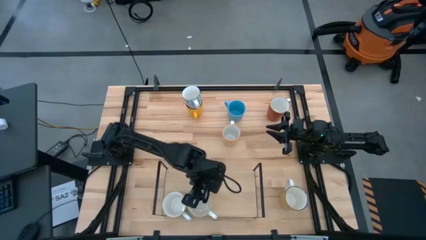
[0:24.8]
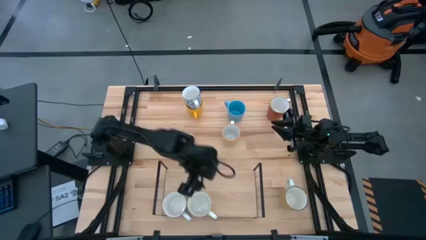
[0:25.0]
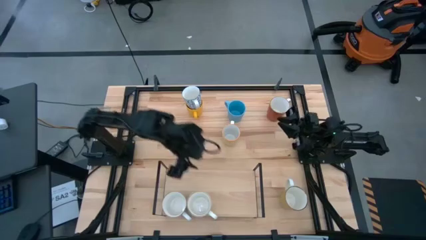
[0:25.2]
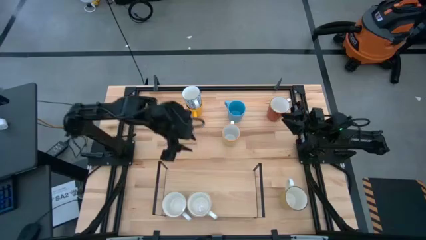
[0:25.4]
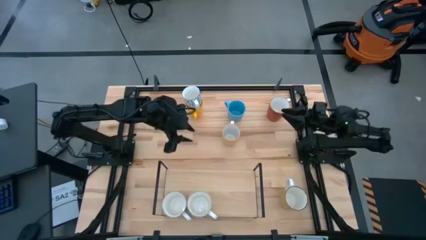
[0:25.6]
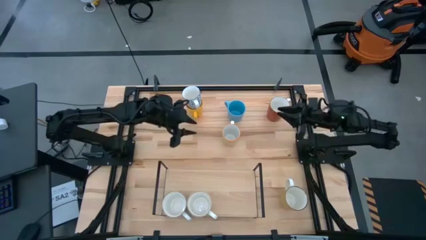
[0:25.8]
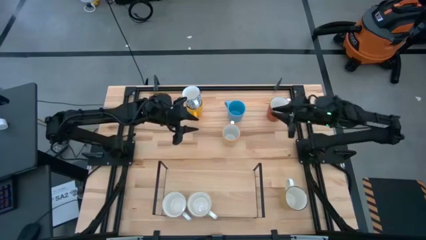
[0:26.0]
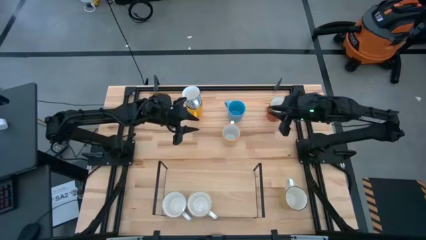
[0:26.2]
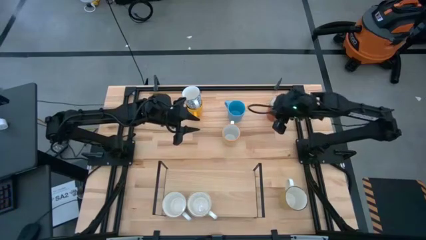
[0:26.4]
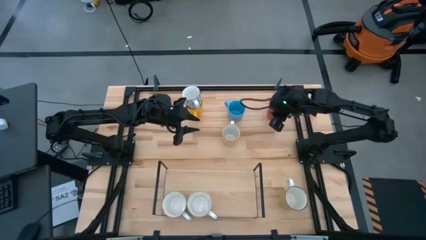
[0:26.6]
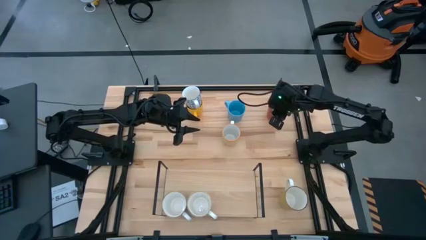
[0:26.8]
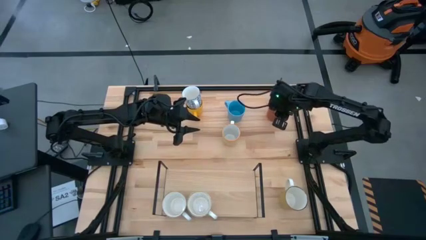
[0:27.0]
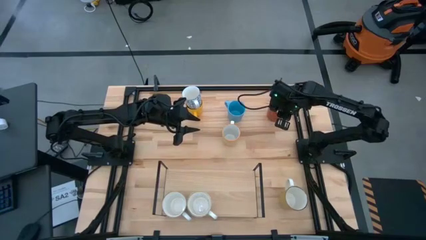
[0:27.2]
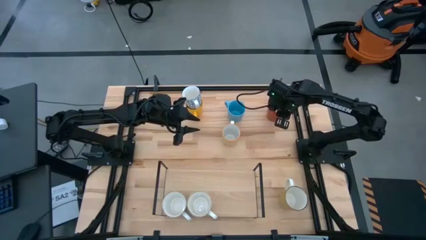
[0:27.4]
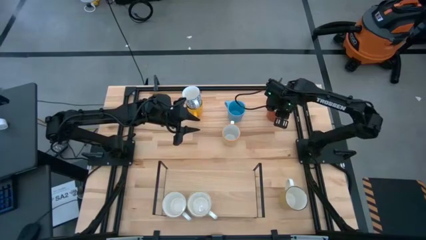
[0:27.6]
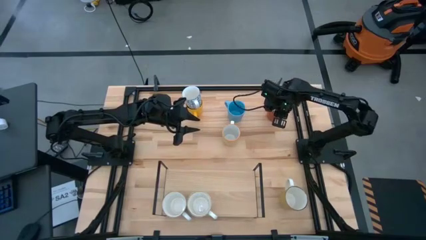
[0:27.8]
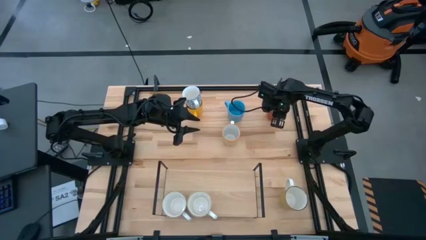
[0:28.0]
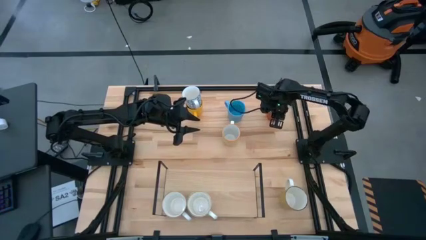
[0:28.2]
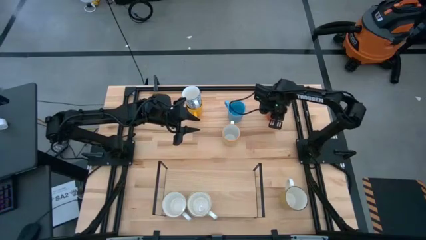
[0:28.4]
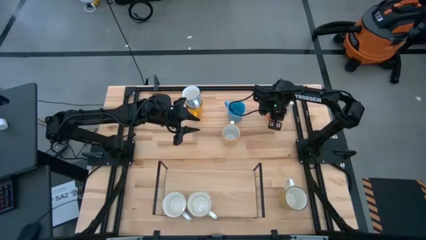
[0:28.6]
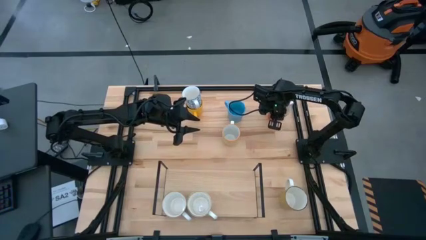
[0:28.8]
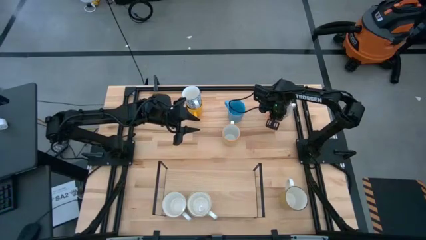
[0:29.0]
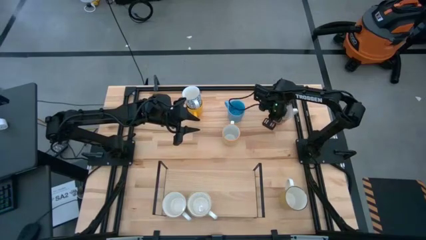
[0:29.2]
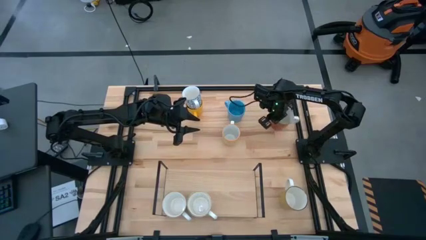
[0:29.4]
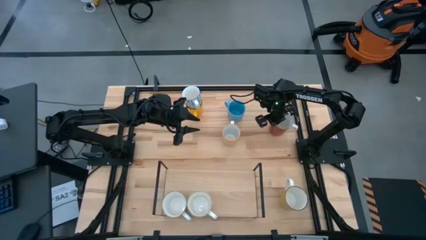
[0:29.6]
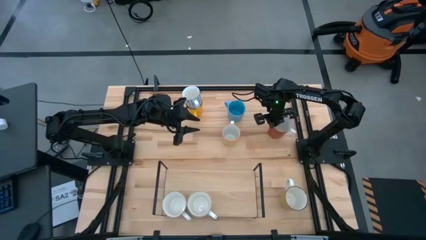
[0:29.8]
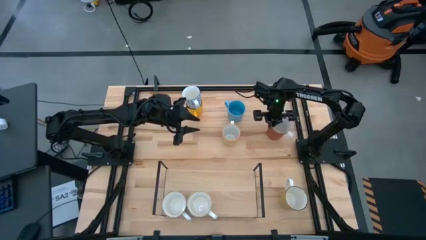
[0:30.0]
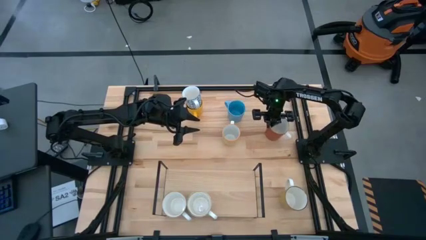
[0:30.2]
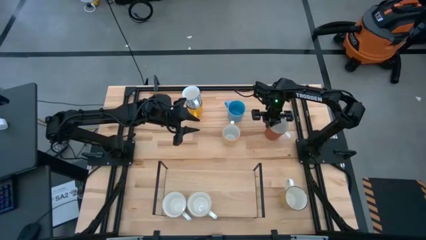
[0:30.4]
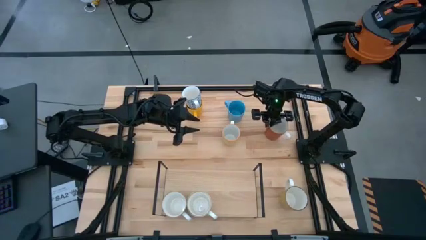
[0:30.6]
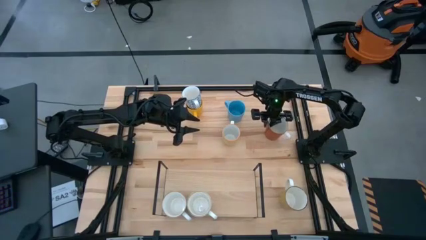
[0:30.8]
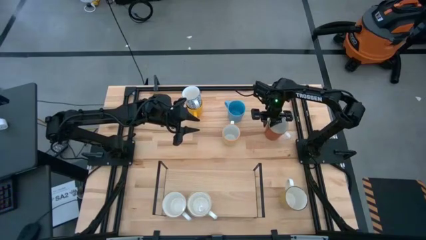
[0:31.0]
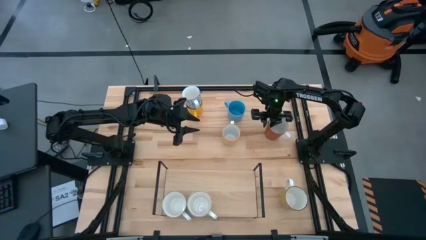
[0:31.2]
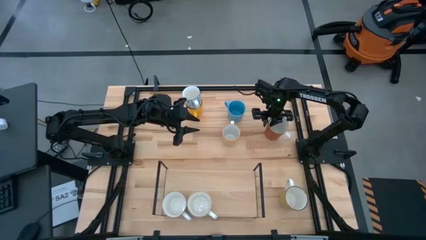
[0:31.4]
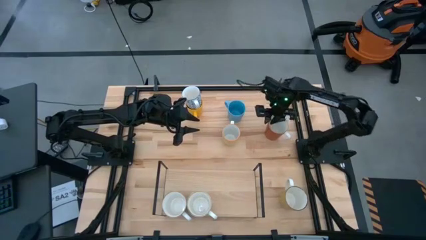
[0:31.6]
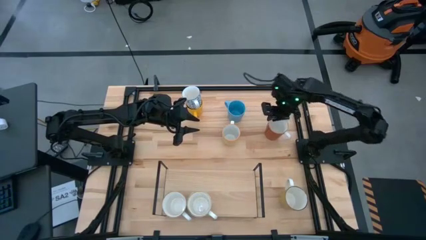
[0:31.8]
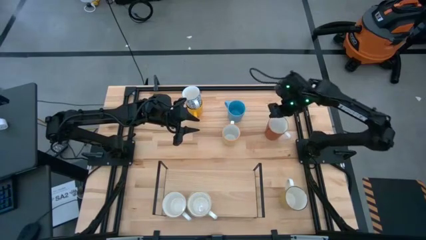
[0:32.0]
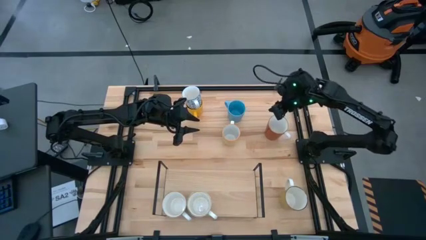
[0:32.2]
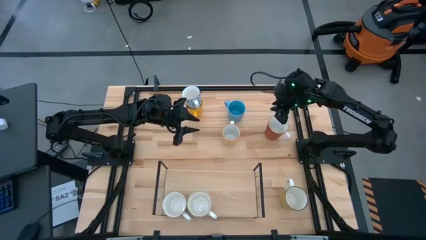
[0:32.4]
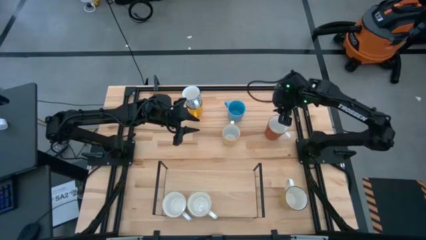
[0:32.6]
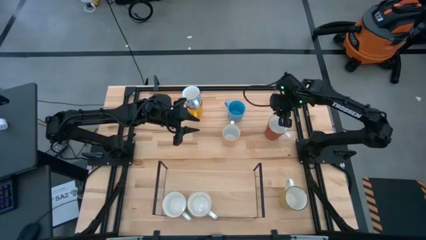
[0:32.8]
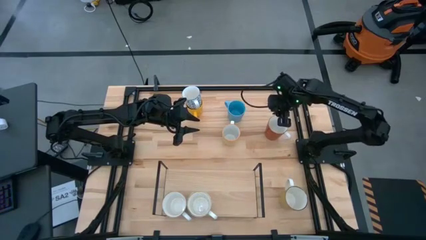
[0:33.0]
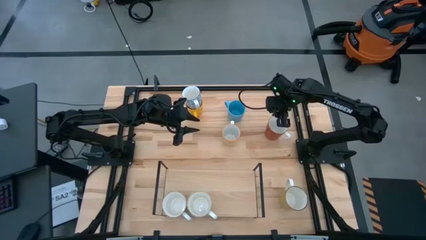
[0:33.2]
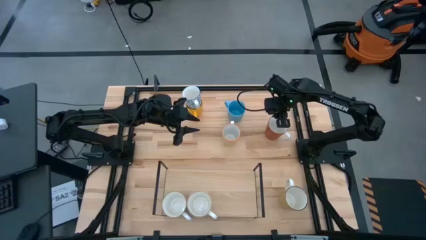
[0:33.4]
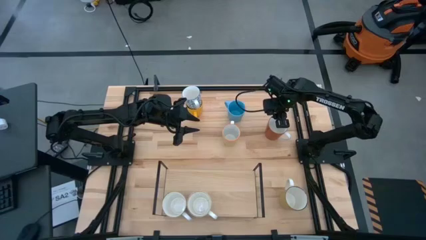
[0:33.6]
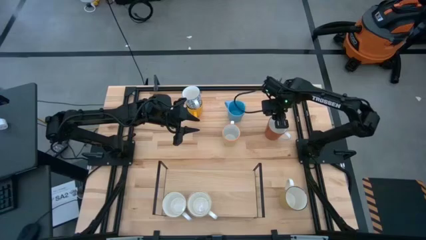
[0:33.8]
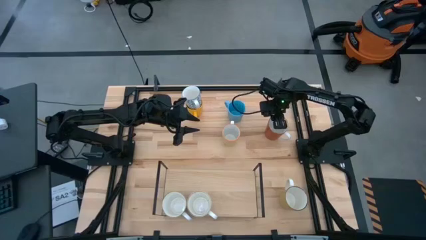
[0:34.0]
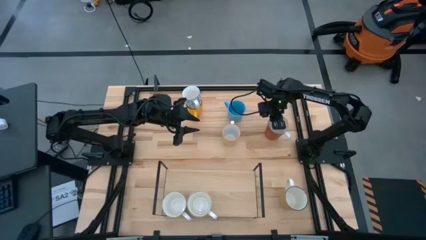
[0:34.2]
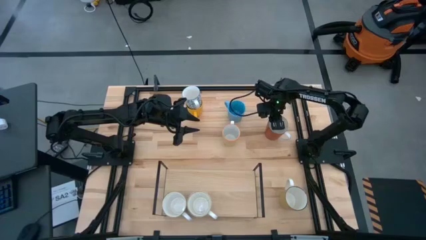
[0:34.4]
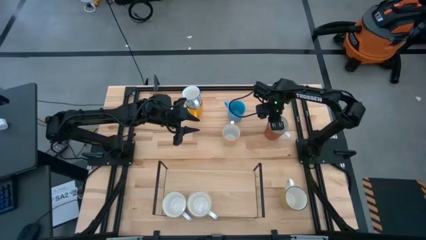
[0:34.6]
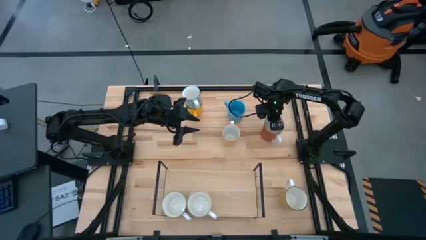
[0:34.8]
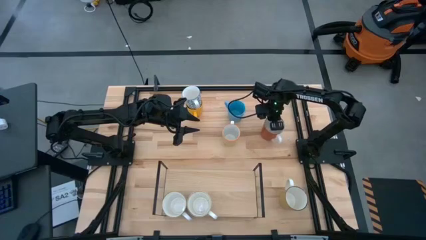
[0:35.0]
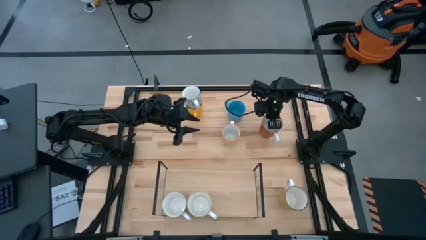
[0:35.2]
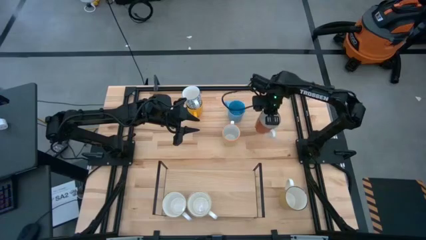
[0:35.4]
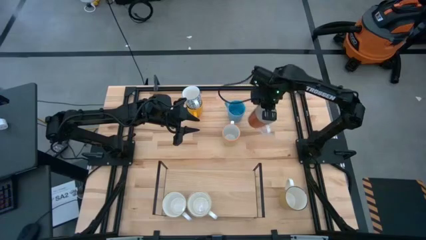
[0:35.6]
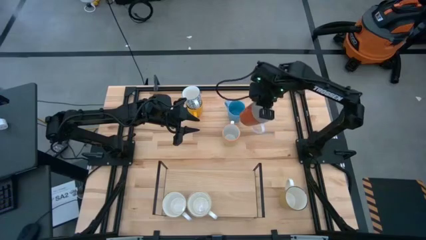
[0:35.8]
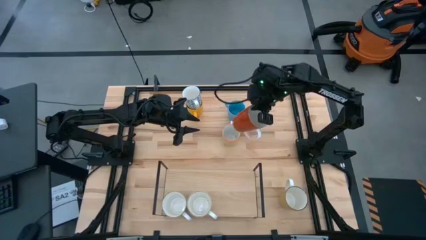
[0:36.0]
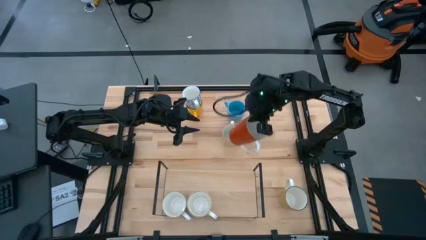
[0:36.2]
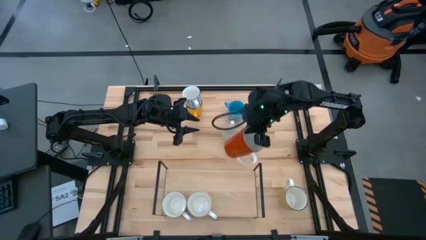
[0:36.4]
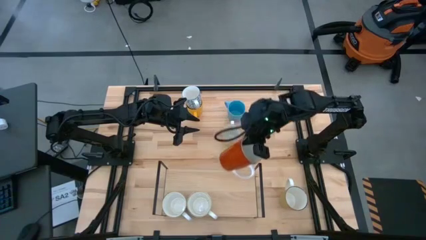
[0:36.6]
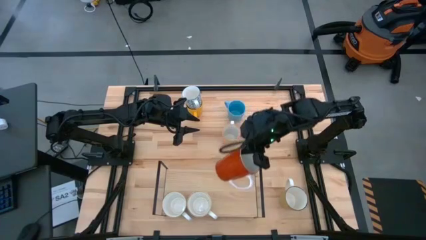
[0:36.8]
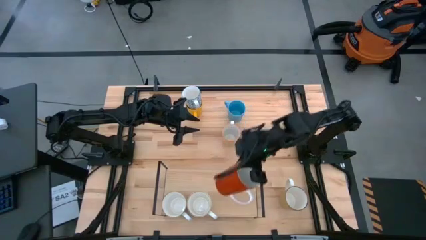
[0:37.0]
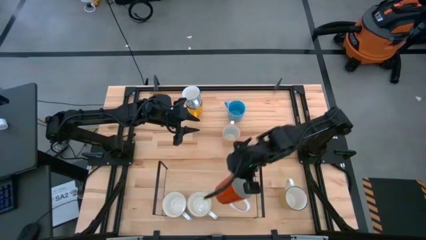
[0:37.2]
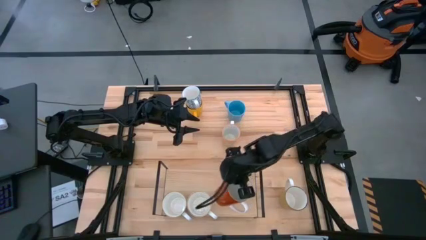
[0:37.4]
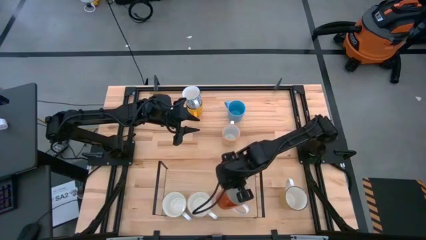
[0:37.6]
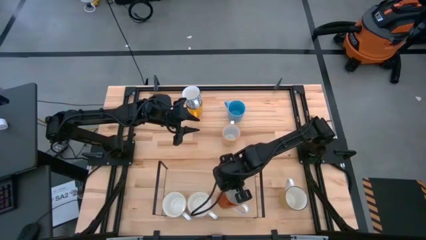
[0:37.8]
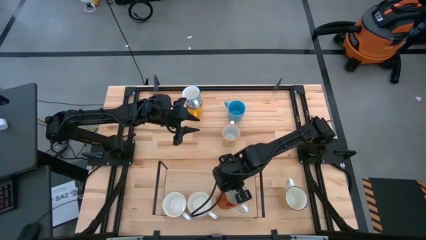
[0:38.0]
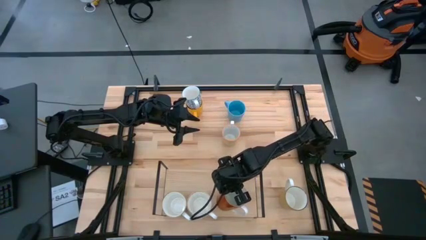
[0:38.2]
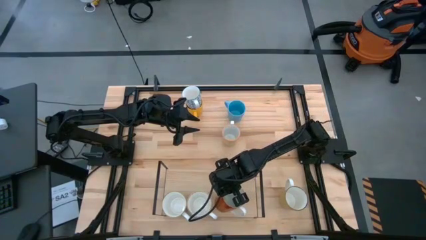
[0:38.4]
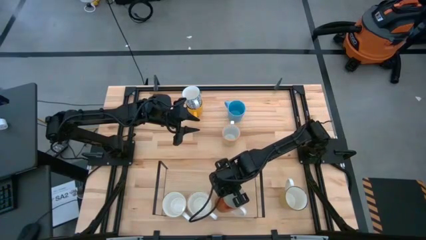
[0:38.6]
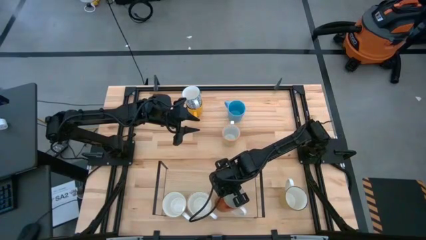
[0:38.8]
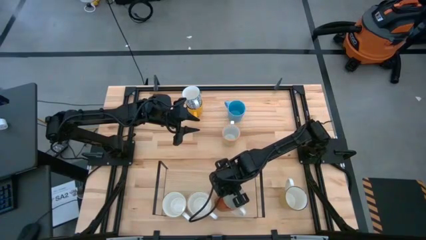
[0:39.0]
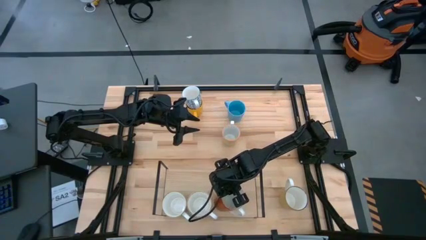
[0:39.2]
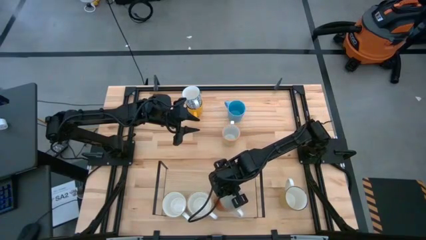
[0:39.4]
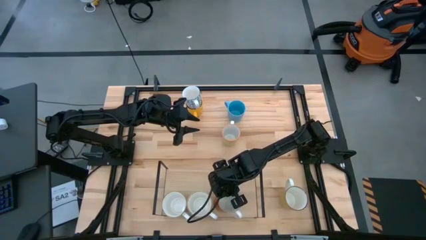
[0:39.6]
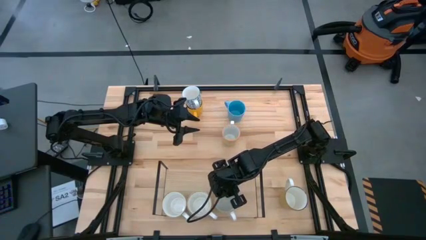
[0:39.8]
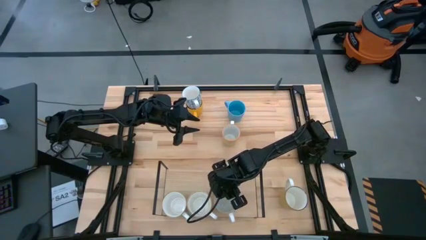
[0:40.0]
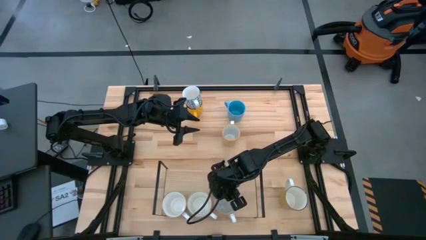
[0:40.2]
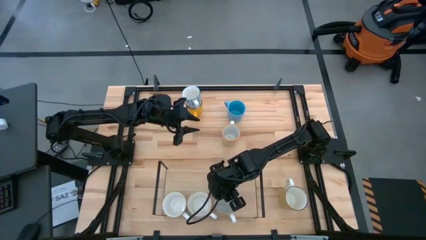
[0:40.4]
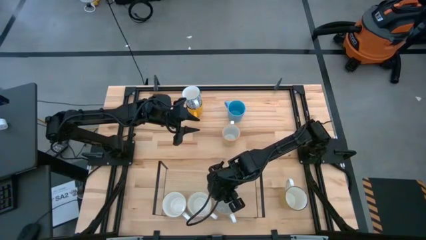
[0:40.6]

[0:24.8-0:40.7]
Task: Place coffee mugs
Put the red mug on the shelf
